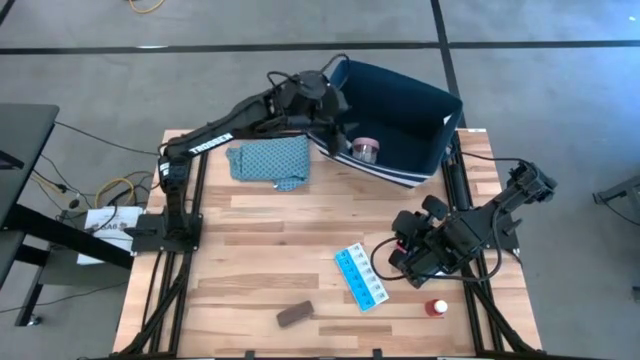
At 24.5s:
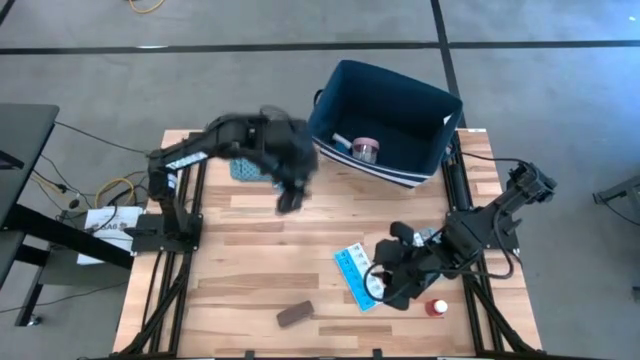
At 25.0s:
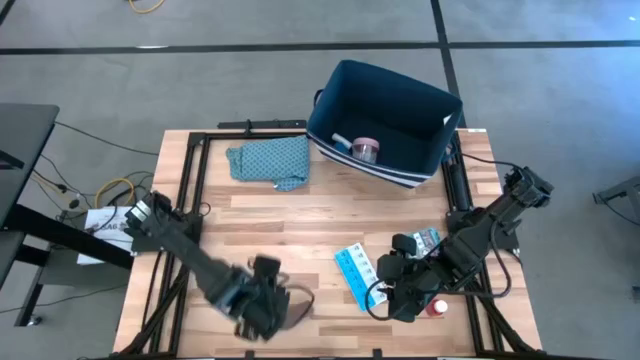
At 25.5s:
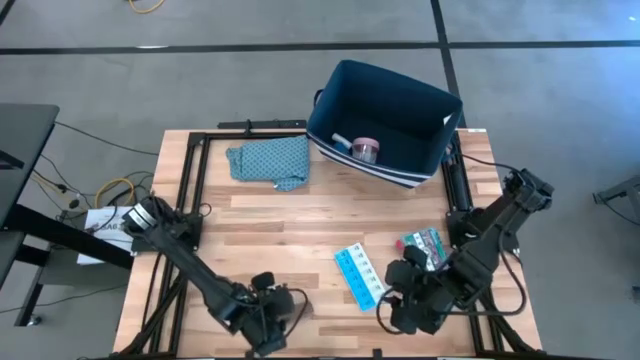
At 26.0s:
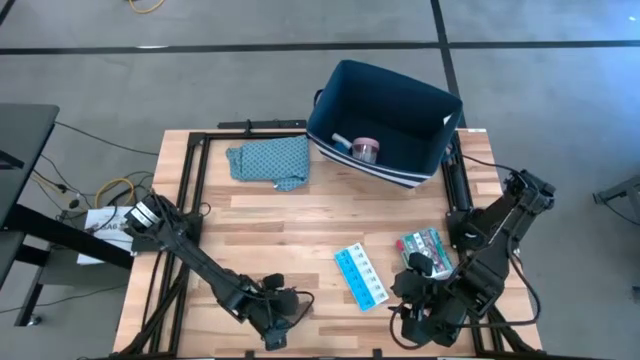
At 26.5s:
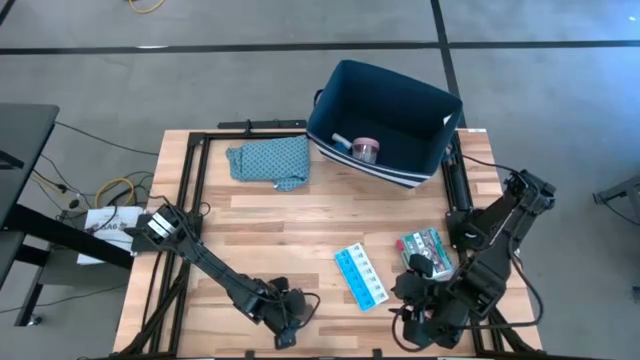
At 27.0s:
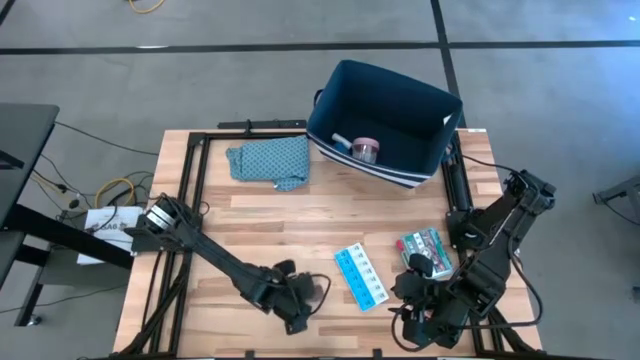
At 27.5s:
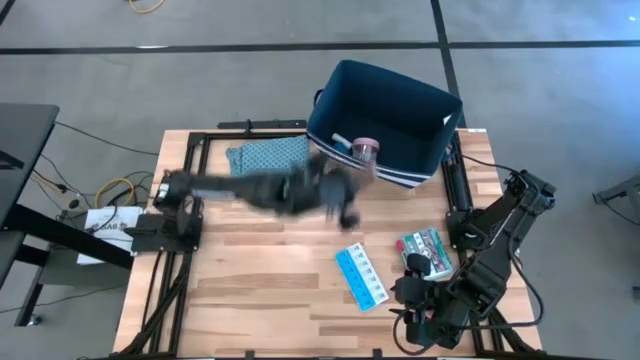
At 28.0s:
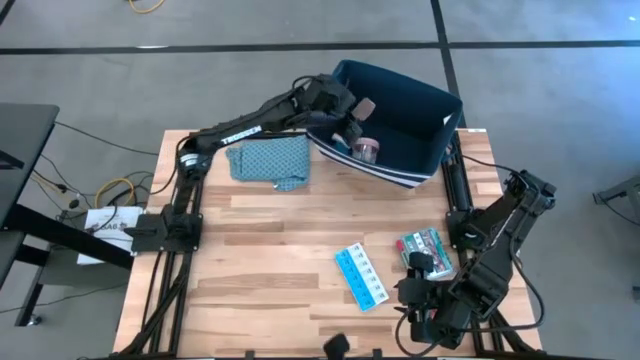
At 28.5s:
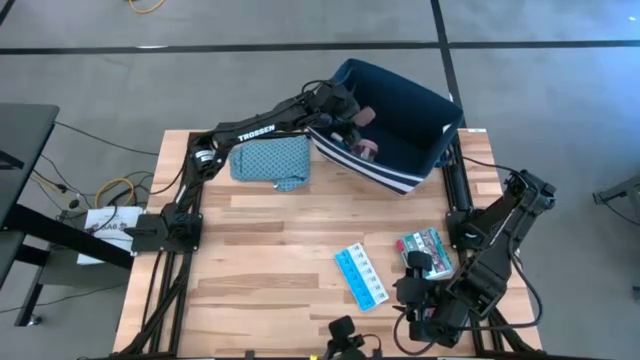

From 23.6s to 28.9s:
Task: Pick & place medical supplies in basket/bin
Put the brown bandage into the blue bin

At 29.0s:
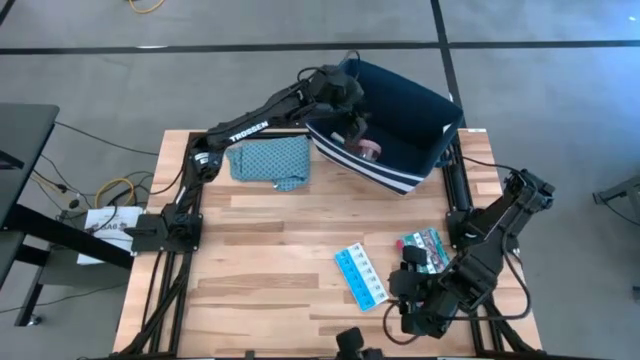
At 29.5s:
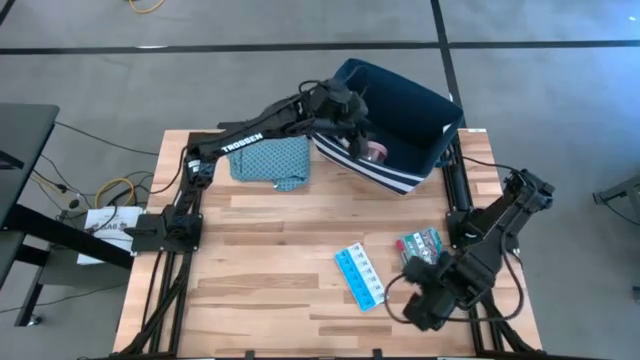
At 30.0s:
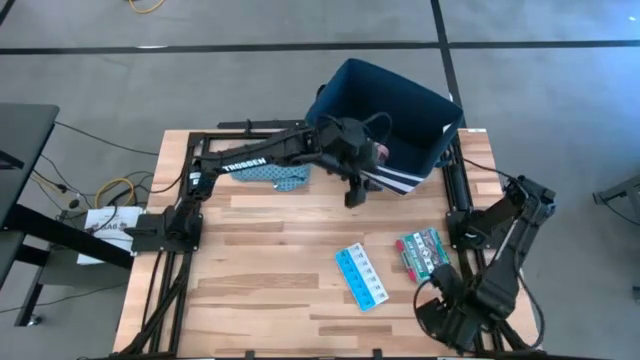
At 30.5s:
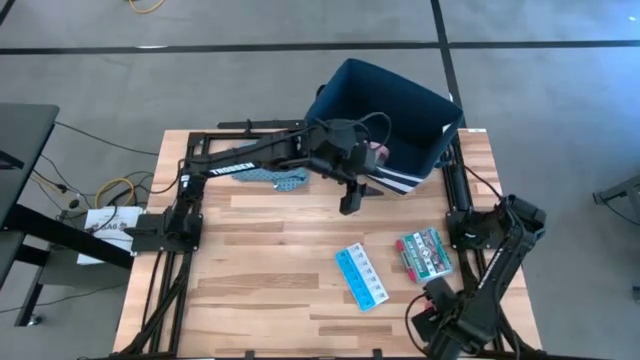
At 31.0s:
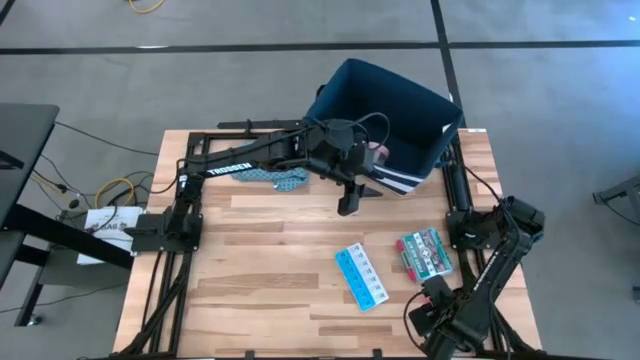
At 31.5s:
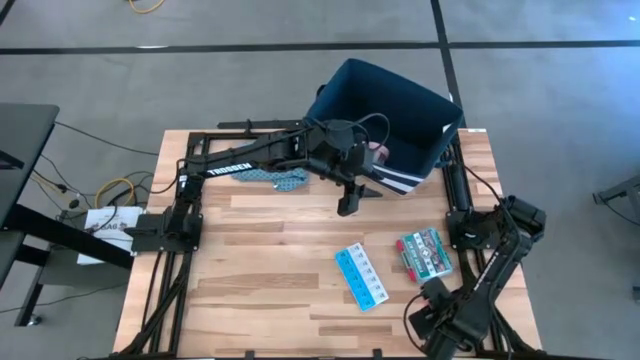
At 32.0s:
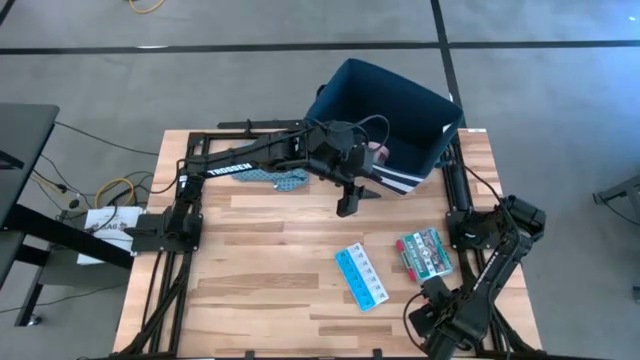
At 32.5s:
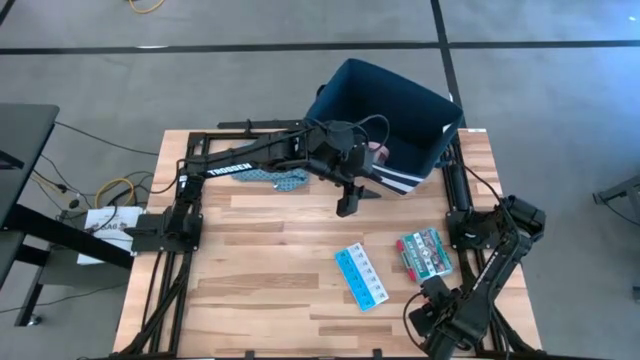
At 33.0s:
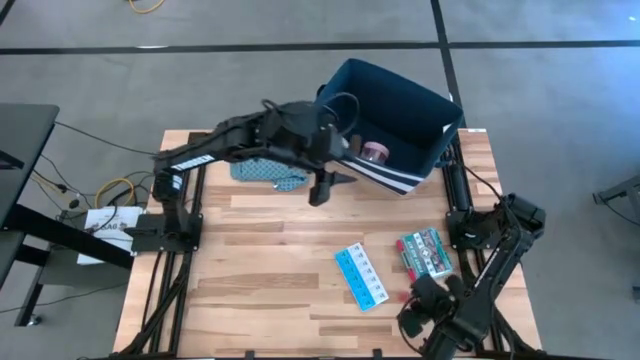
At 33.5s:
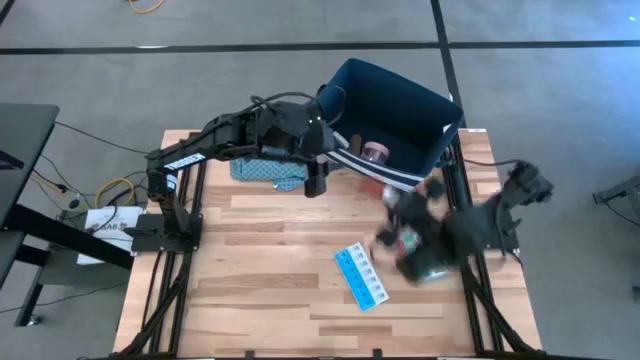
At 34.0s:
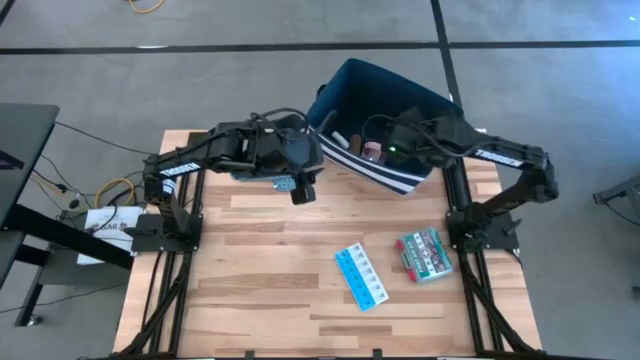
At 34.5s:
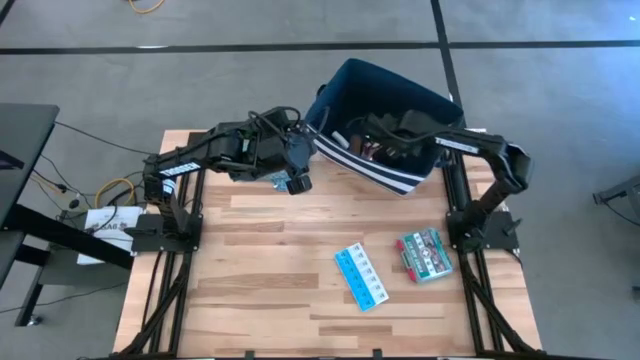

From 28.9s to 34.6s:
Put the red medicine bottle into the blue bin

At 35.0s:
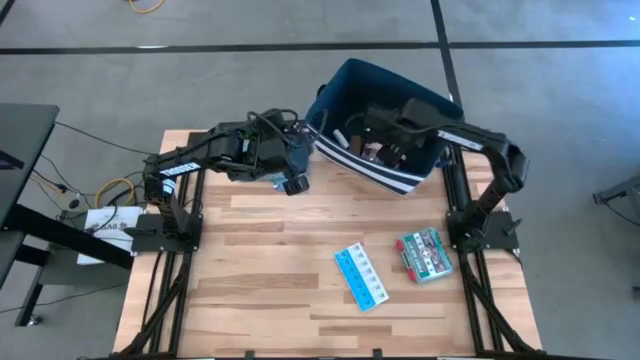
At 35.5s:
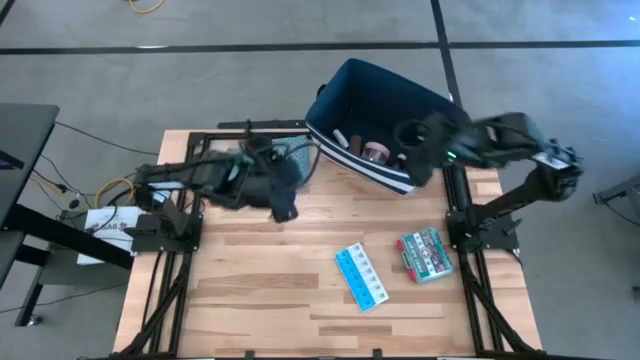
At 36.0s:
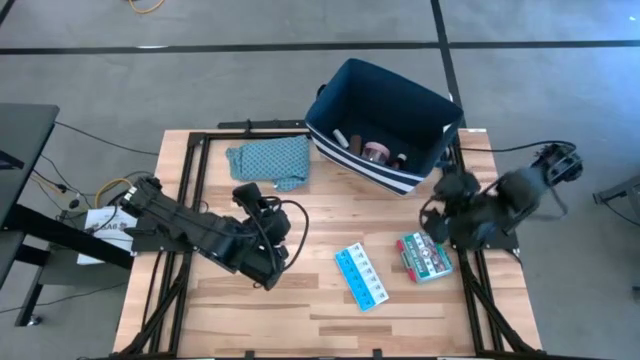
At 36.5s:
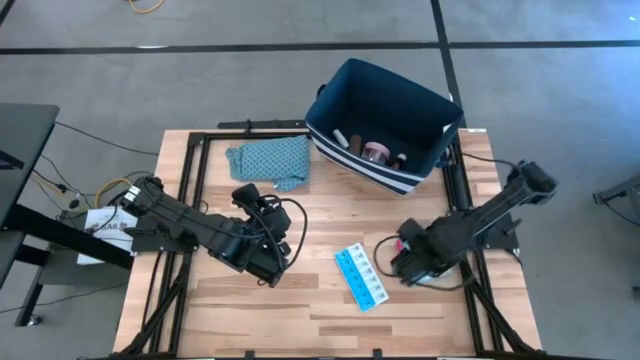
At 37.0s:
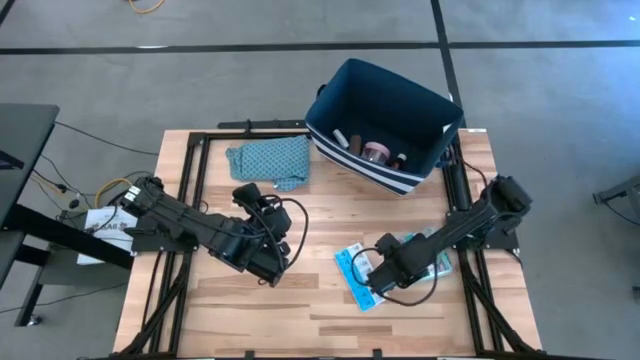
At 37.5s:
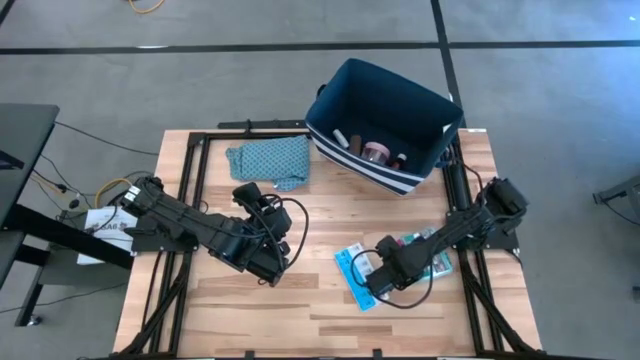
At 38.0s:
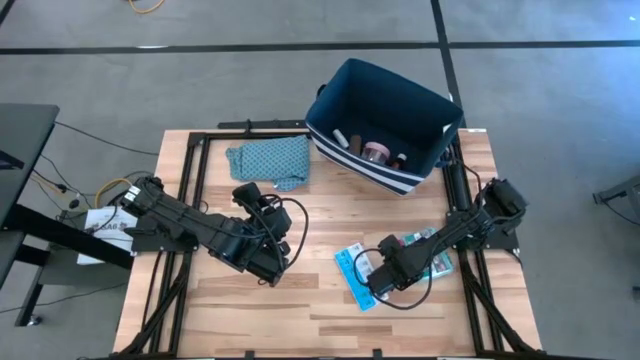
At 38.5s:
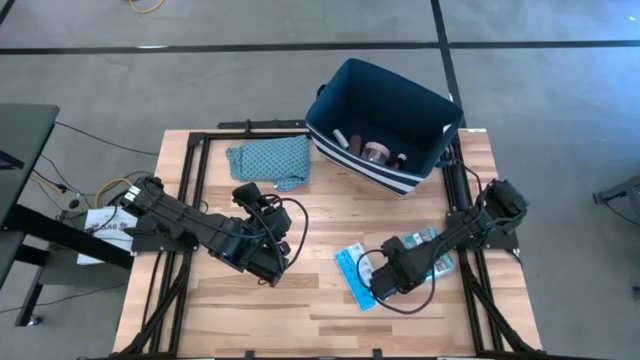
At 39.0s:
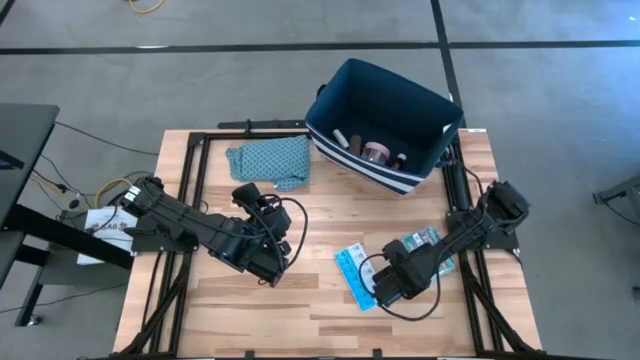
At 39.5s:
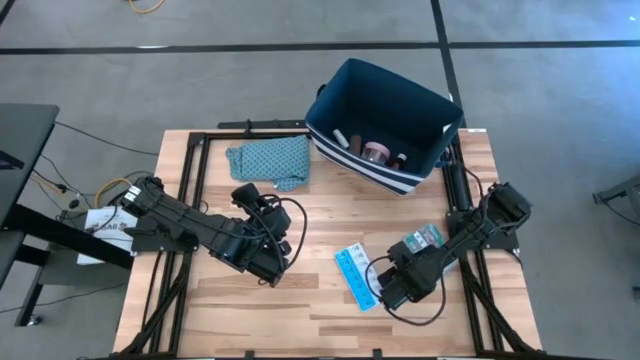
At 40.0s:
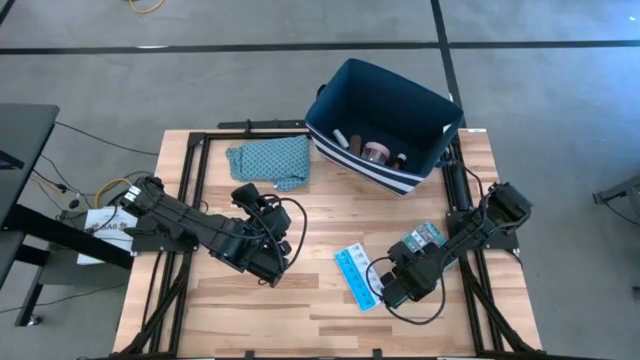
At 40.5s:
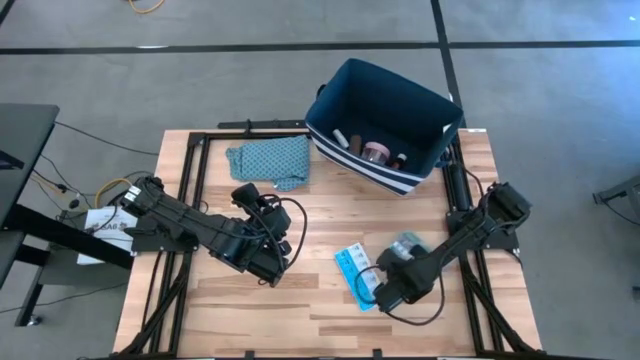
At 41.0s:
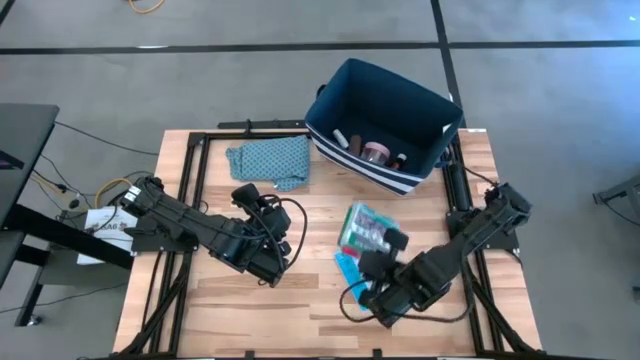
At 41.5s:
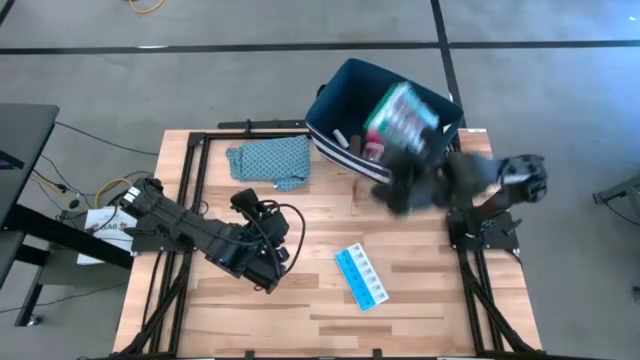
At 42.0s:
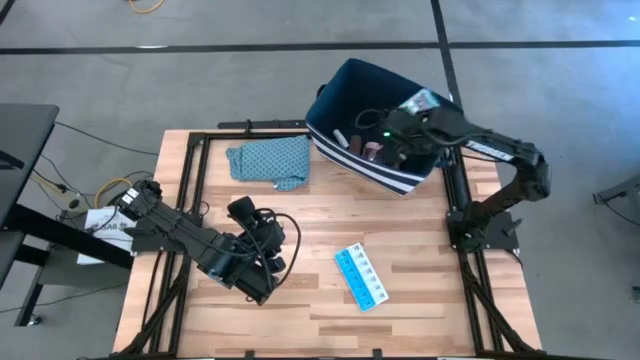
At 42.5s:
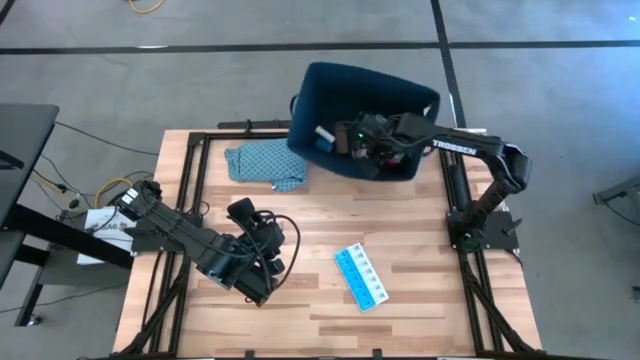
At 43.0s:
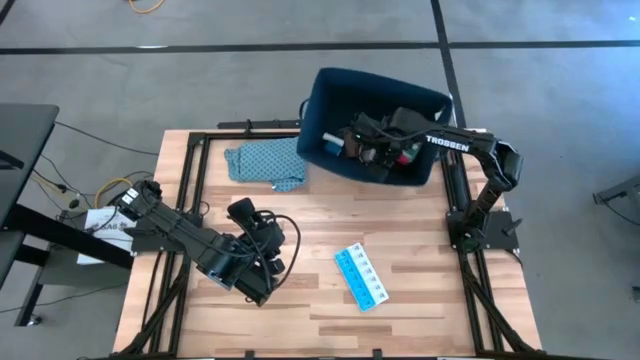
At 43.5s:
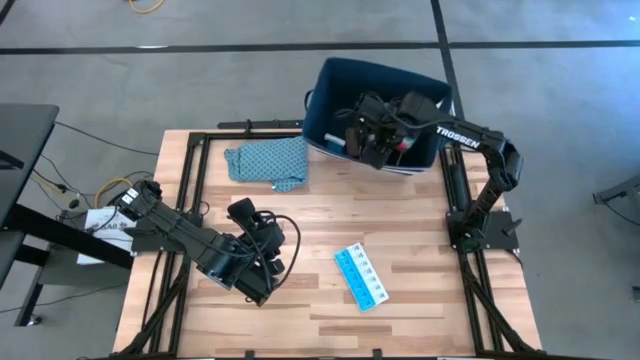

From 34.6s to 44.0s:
Put the green first aid kit box into the blue bin

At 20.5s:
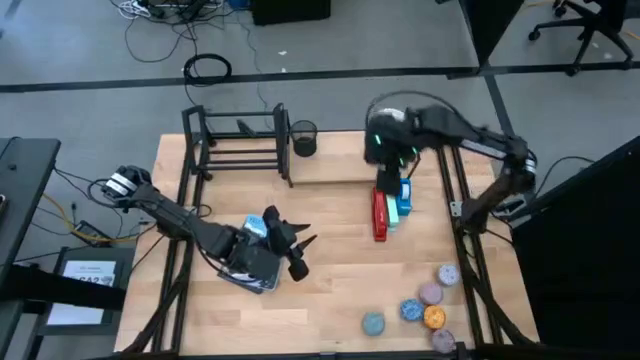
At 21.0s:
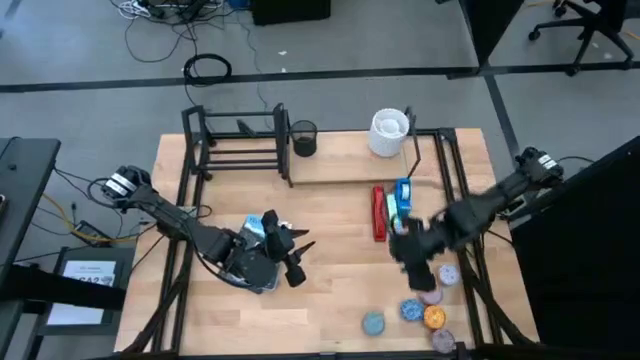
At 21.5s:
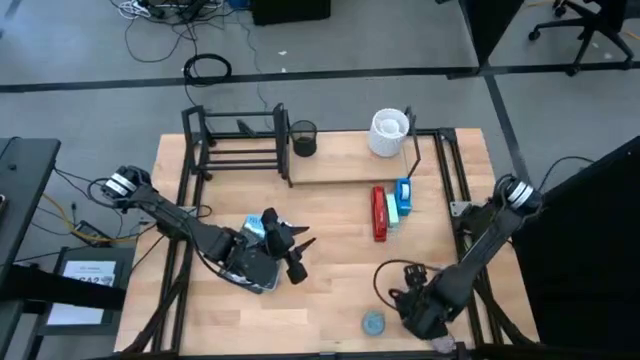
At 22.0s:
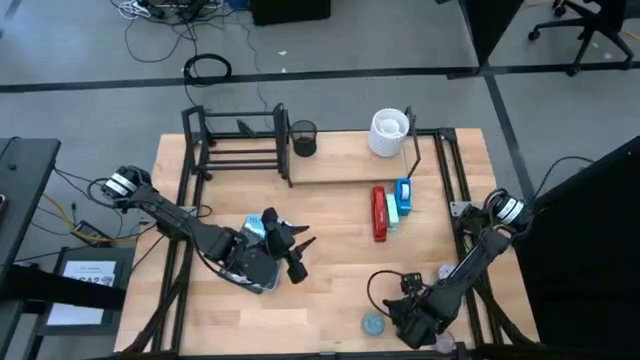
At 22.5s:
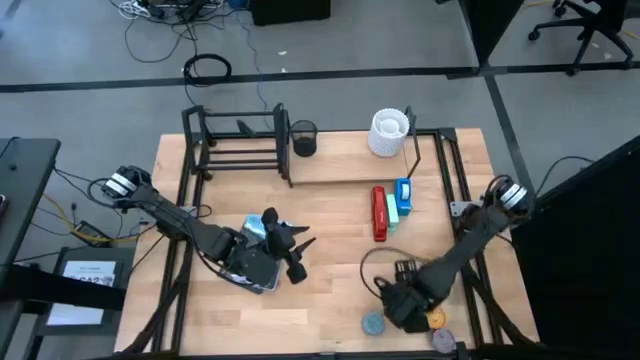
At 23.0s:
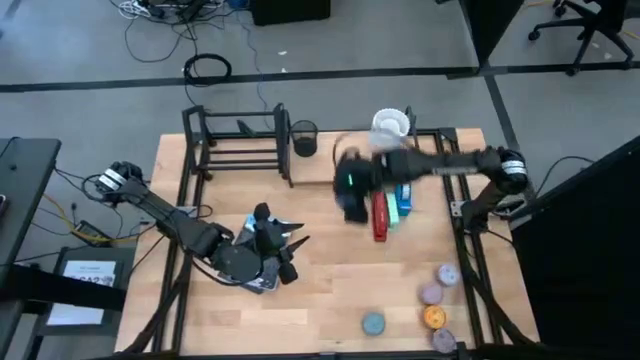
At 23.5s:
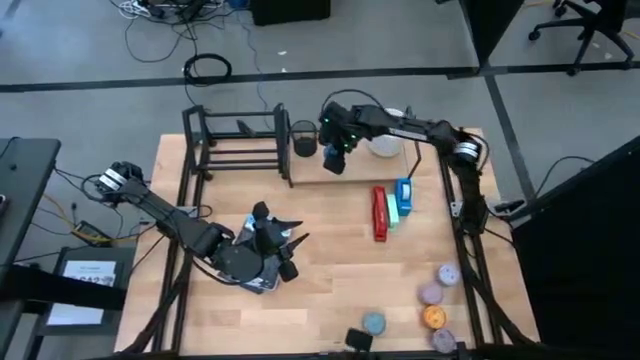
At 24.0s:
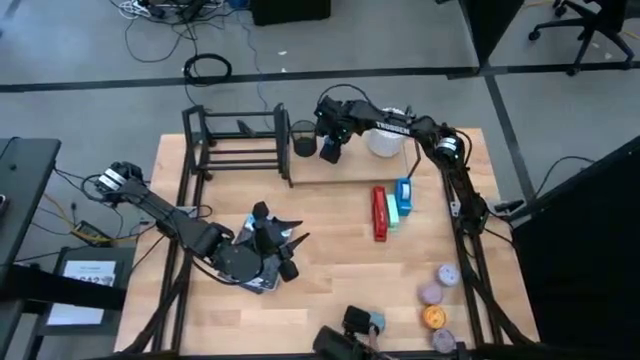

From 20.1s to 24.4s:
Task: Stock shelves
Put the blue scented candle on the shelf
